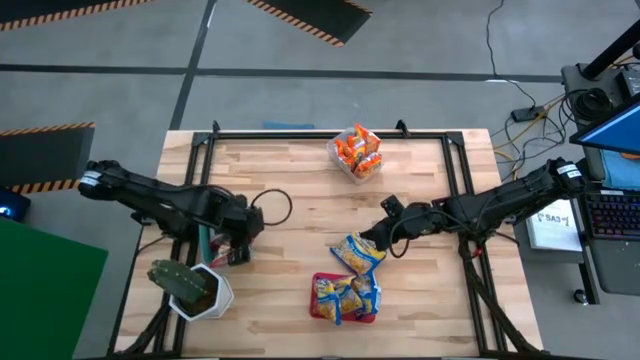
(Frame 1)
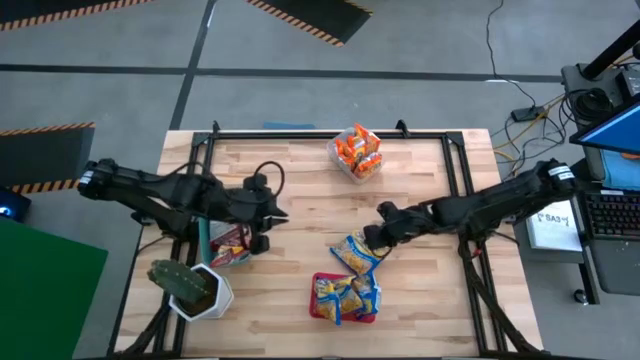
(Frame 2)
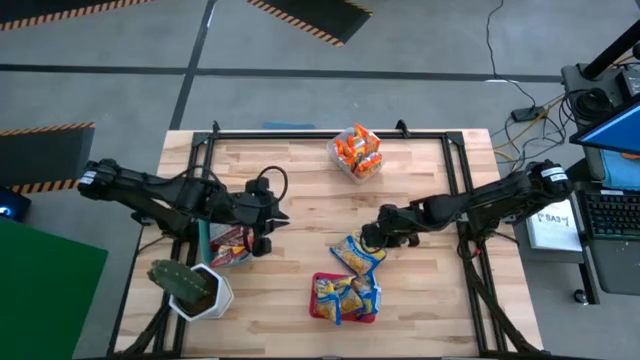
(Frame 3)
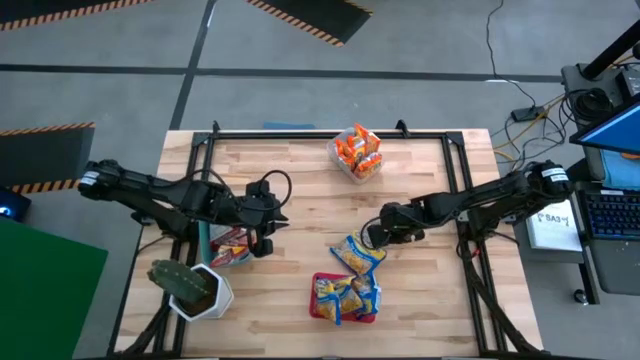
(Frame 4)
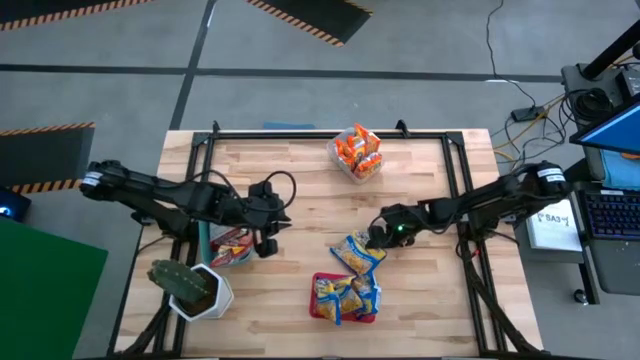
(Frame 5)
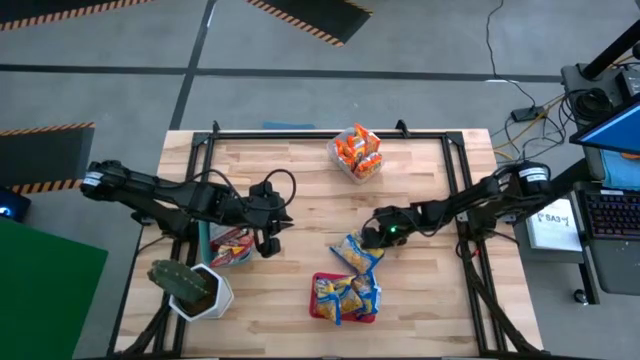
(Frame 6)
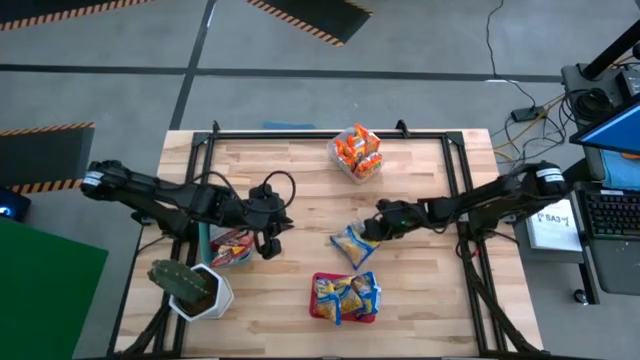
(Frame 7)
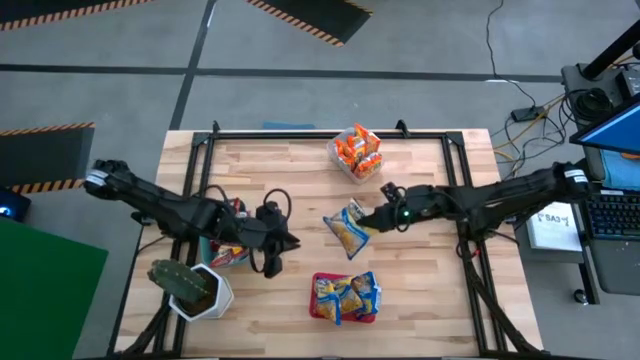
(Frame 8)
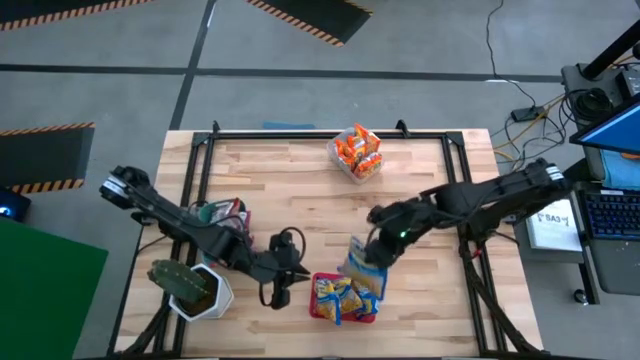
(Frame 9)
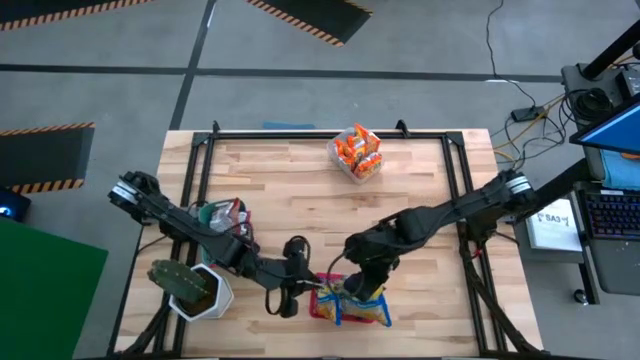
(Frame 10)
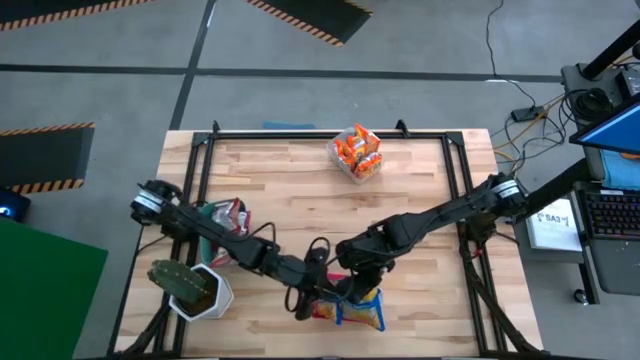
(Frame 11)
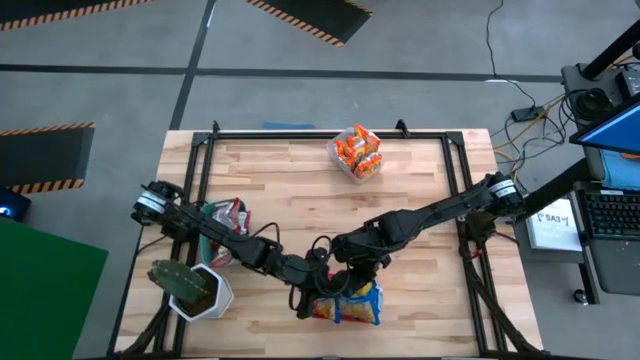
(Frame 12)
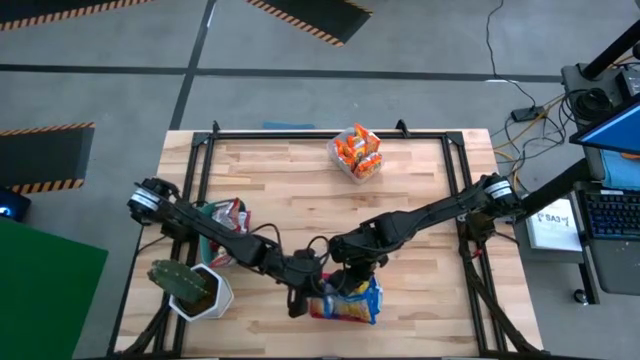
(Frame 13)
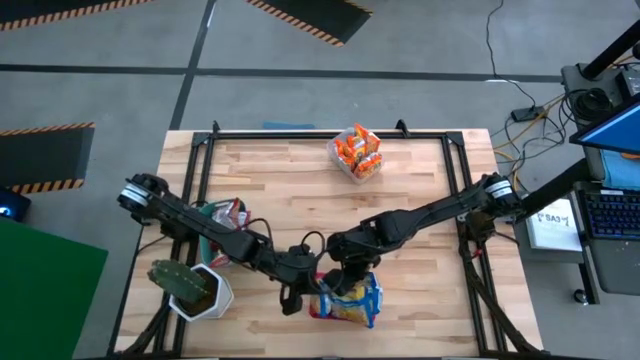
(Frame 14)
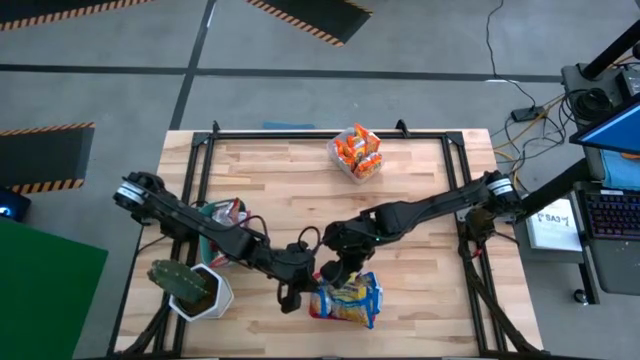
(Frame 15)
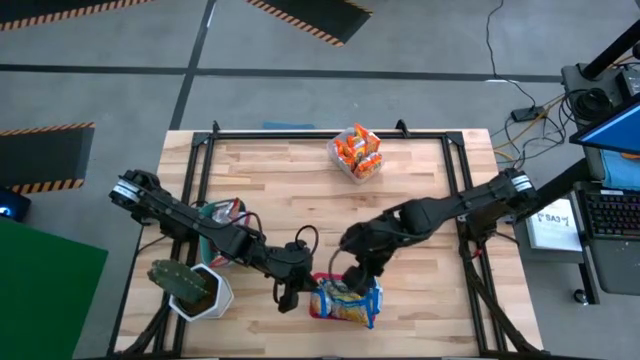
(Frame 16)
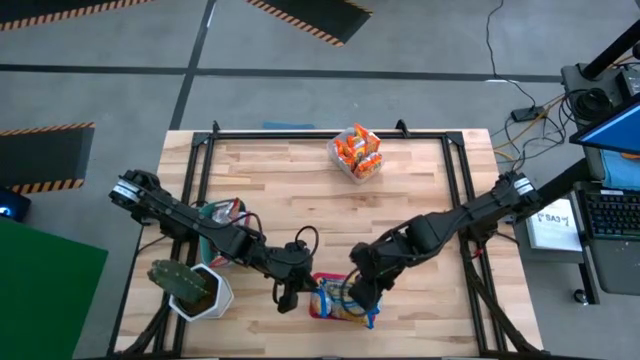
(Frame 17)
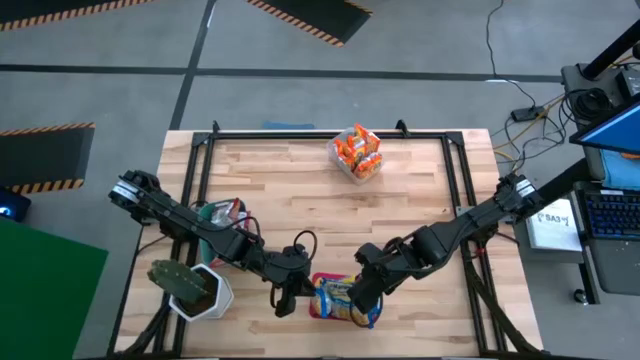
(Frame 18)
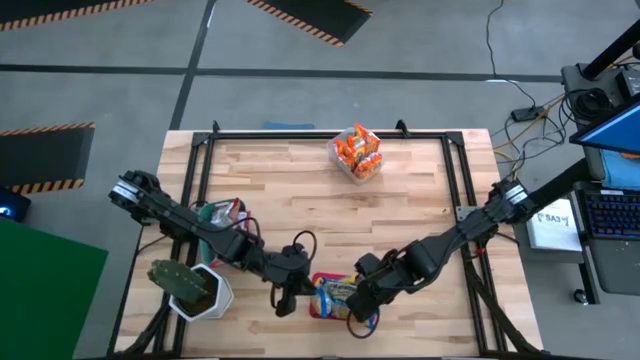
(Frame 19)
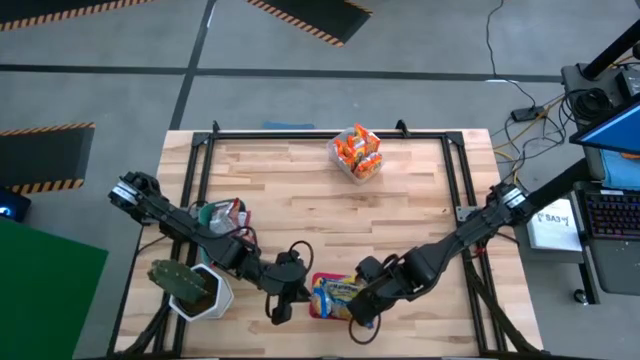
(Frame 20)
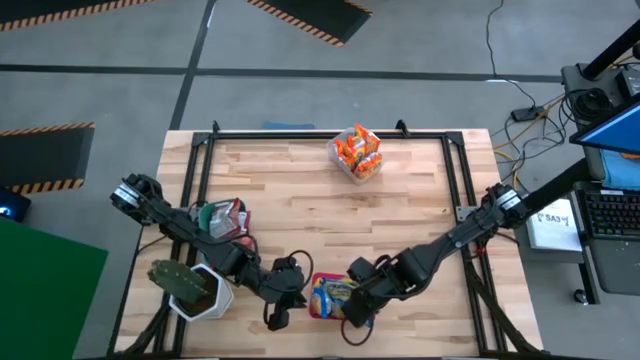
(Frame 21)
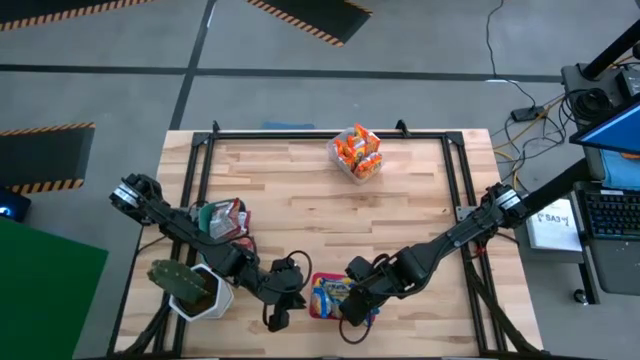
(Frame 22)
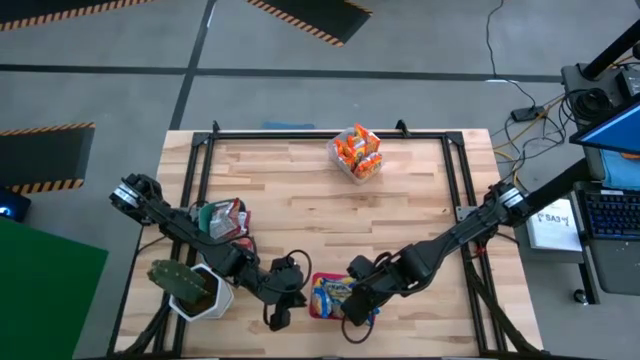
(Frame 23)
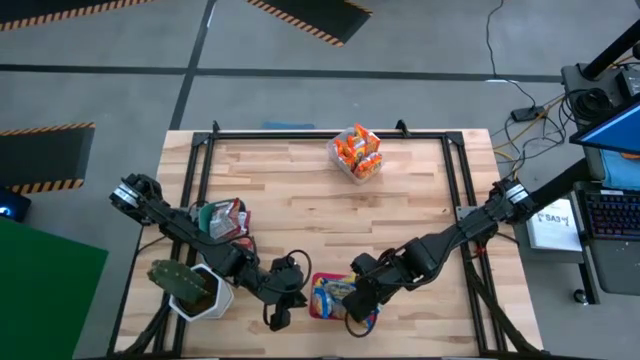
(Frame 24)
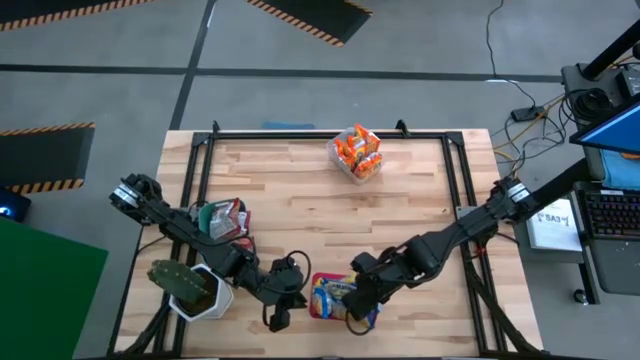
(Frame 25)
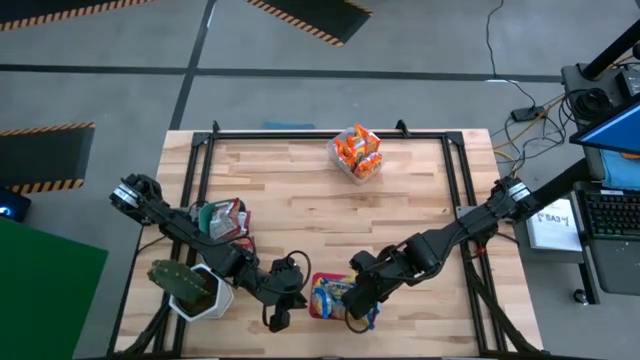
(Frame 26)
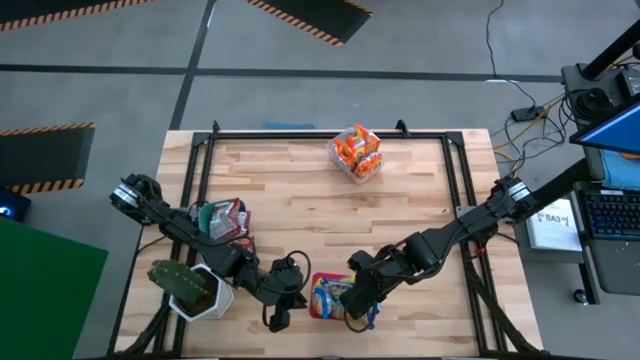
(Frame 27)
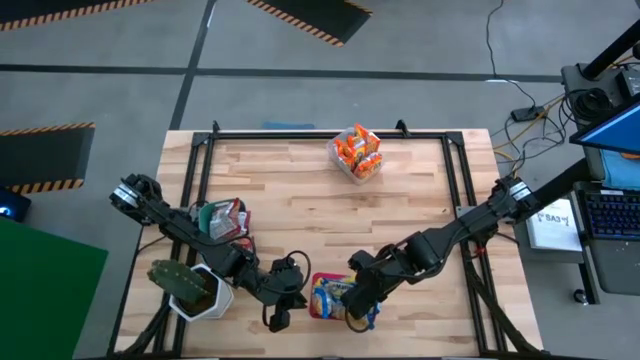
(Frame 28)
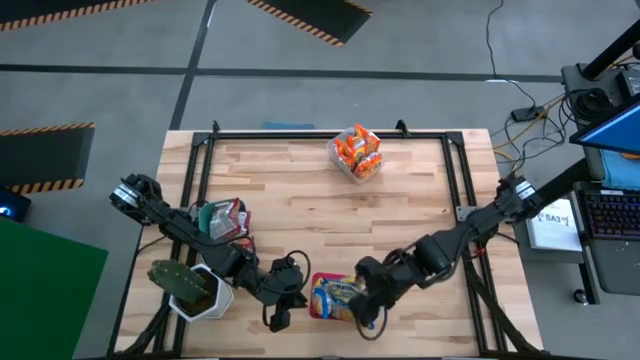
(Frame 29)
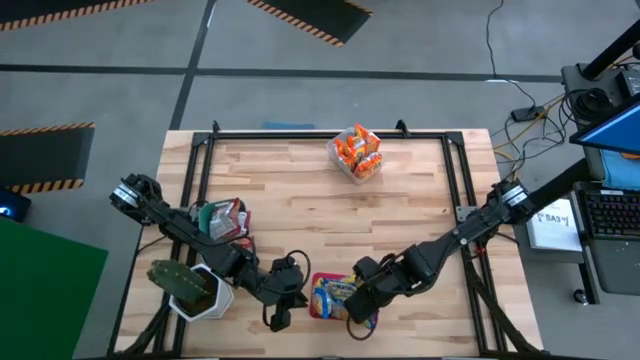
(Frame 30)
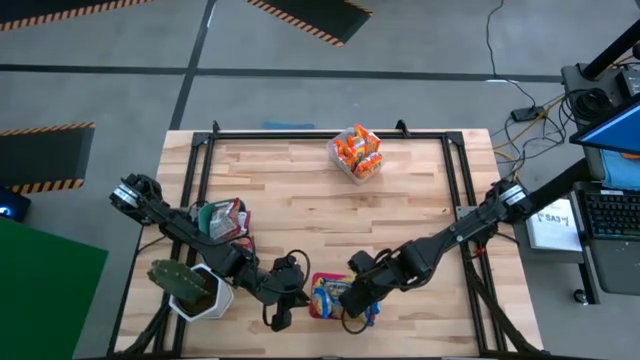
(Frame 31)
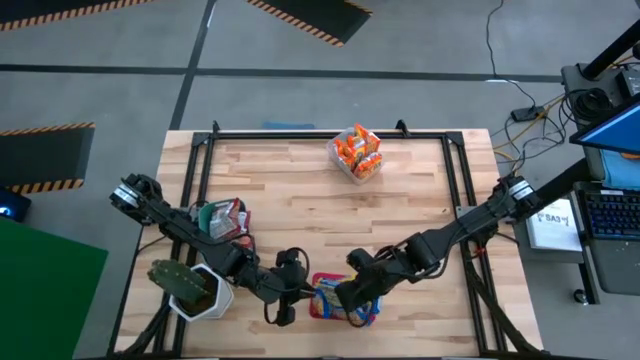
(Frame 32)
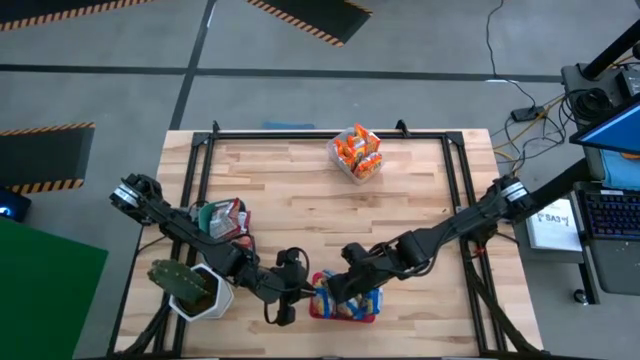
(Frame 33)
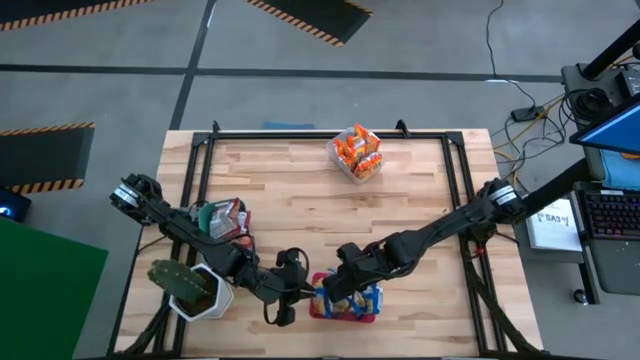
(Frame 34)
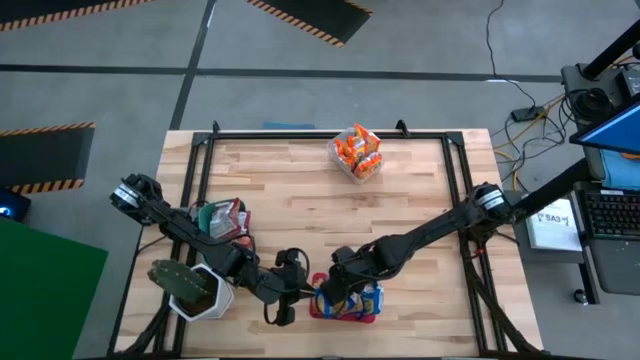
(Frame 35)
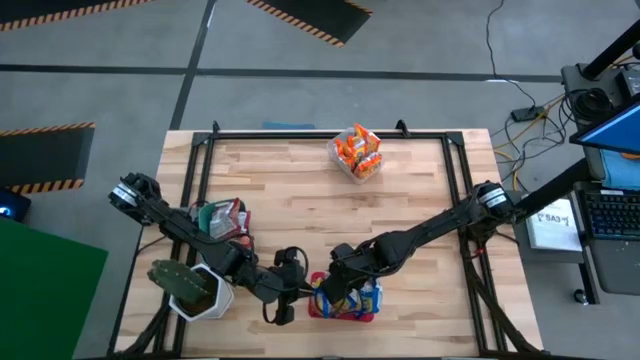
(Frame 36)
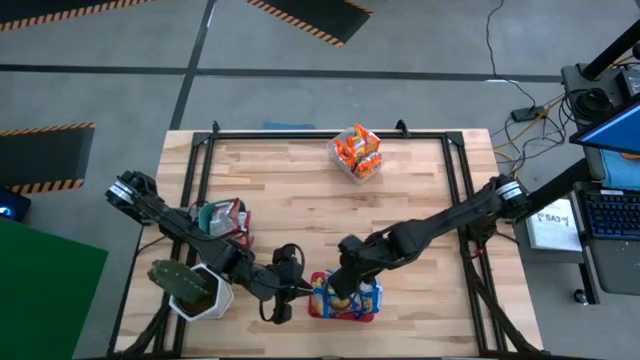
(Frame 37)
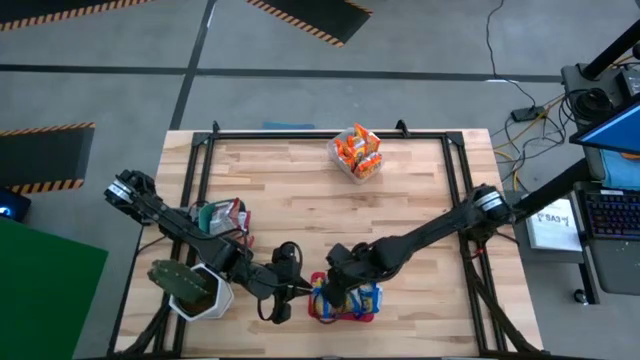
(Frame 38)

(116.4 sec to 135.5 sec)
Task: Sort Maruchan noodles
Put the blue noodle pack into the red bin

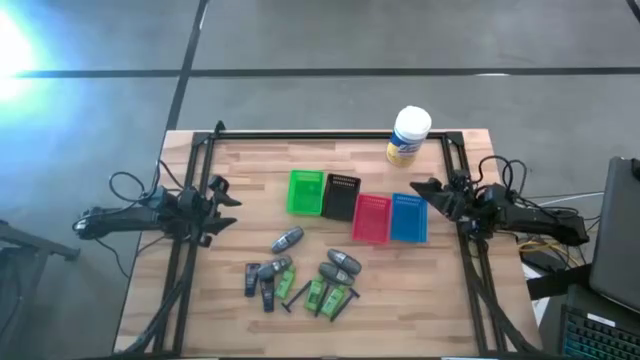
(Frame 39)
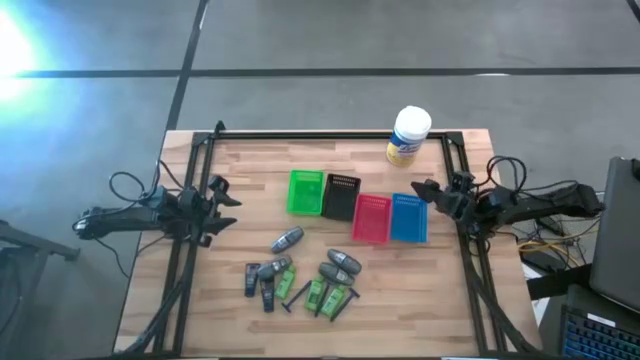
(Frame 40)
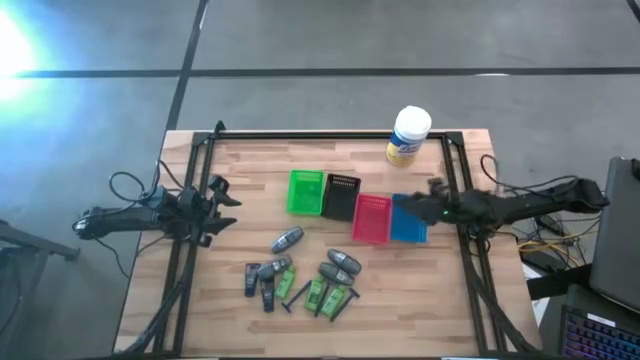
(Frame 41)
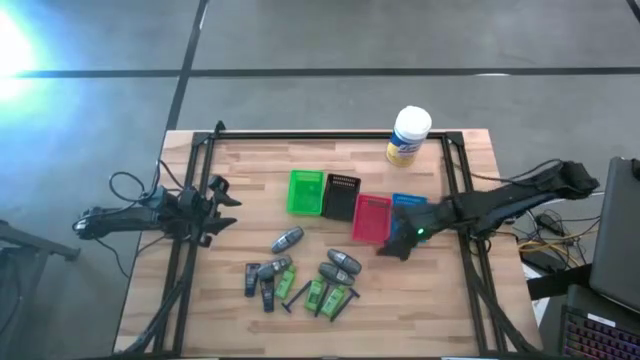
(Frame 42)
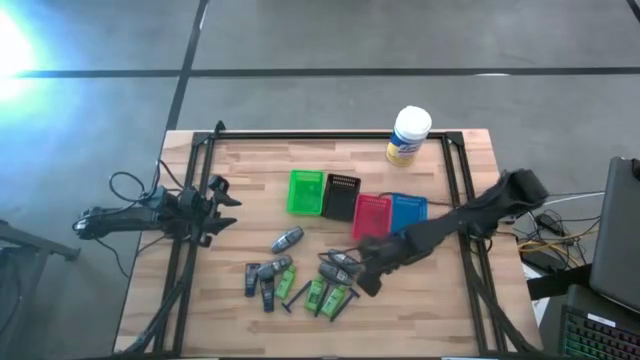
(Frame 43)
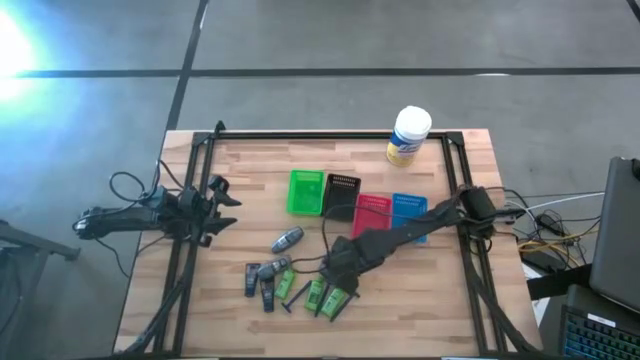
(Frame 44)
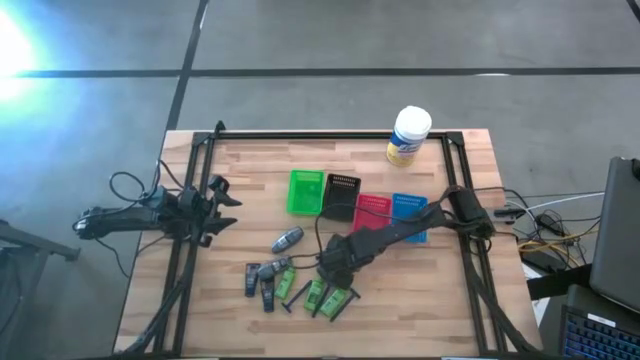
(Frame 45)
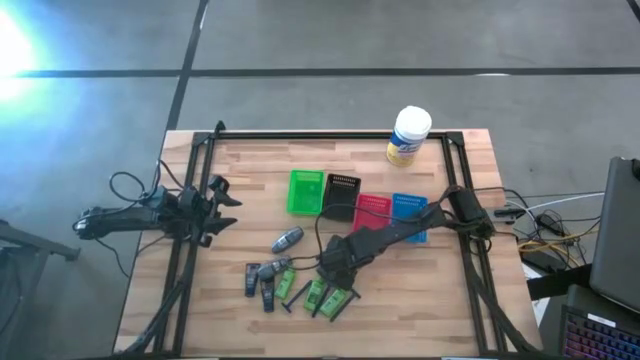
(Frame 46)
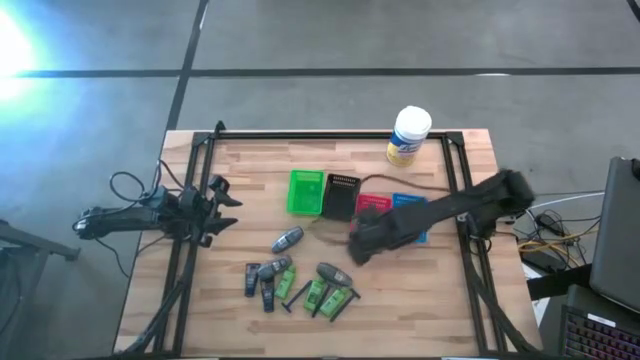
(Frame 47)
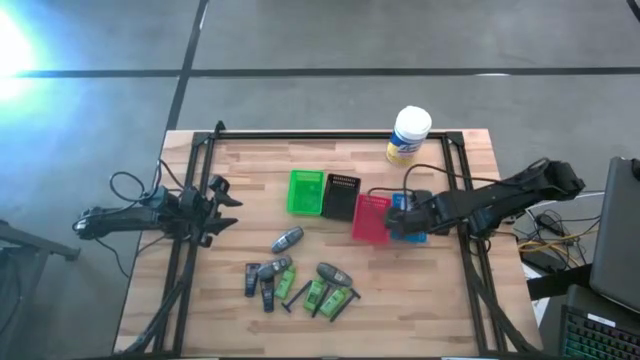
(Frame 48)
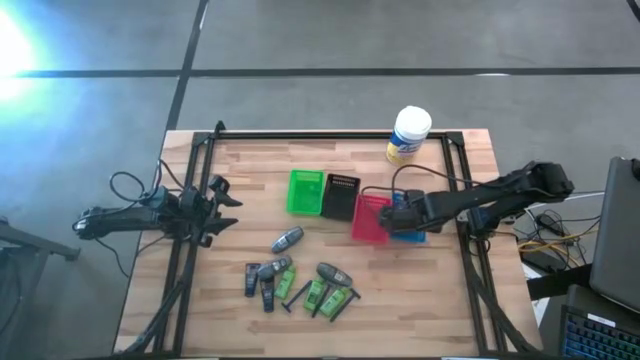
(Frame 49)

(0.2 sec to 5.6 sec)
Task: Pick & Place Travel size toiletries
Put the deodorant into the blue bin
